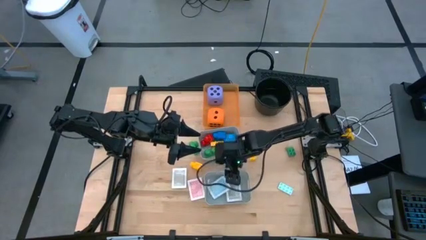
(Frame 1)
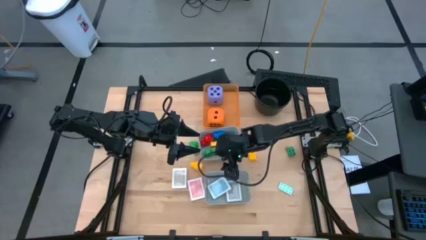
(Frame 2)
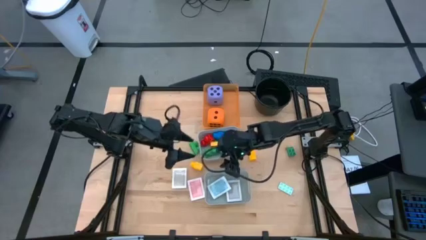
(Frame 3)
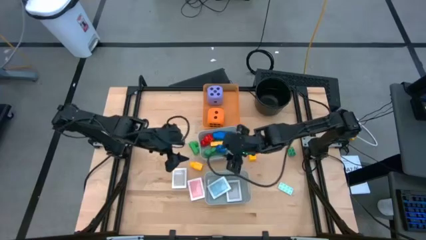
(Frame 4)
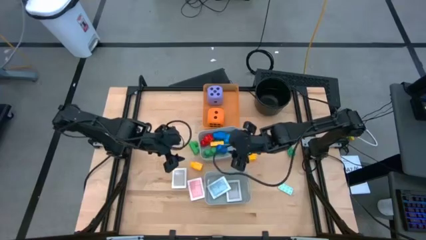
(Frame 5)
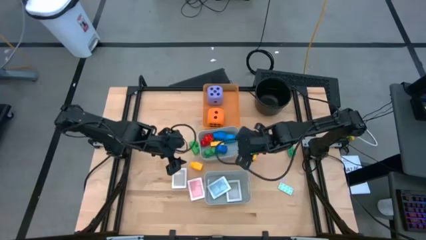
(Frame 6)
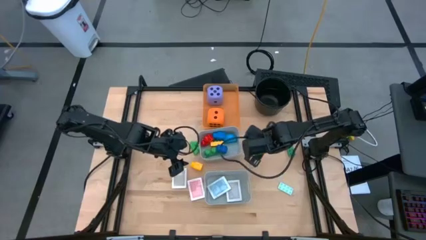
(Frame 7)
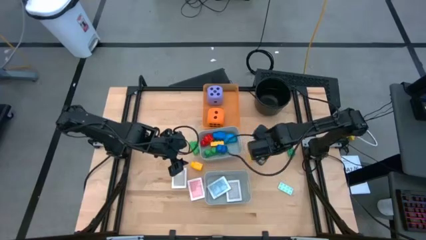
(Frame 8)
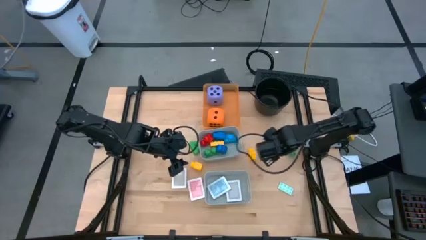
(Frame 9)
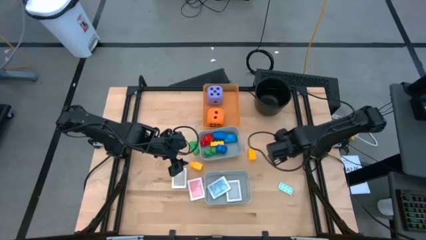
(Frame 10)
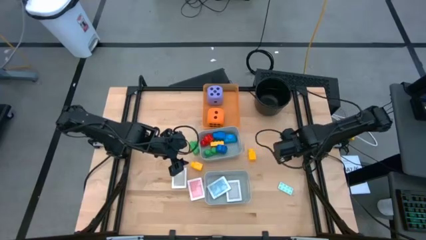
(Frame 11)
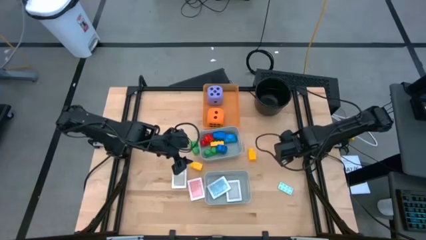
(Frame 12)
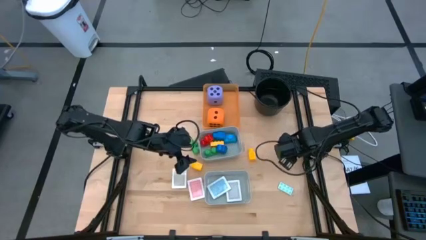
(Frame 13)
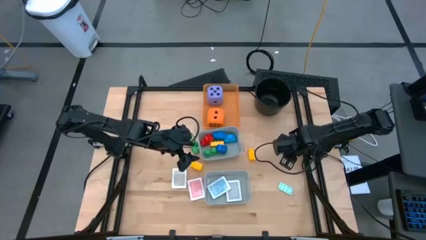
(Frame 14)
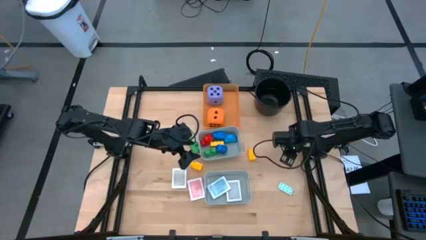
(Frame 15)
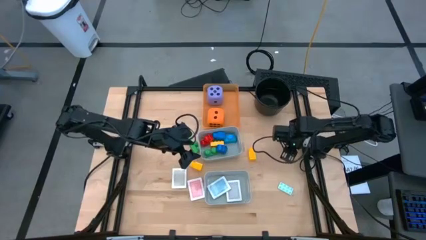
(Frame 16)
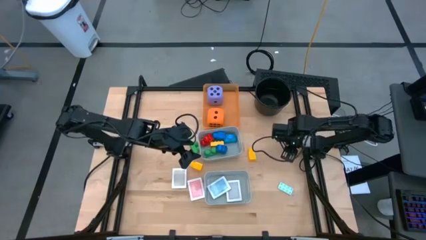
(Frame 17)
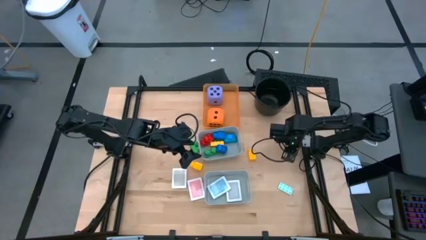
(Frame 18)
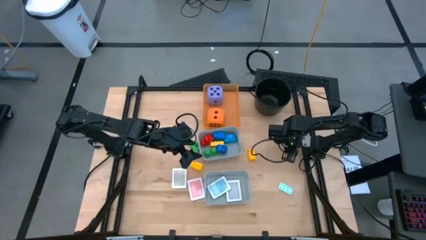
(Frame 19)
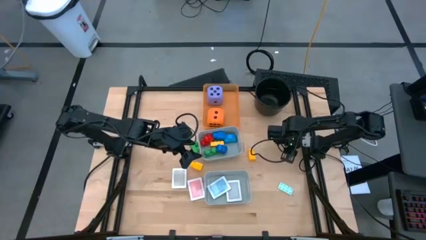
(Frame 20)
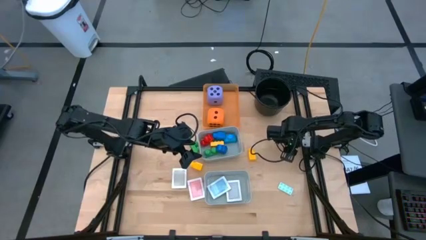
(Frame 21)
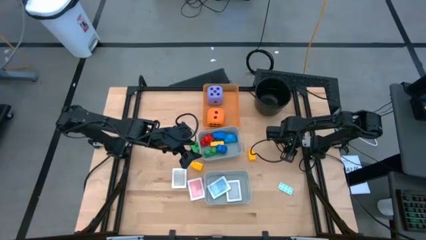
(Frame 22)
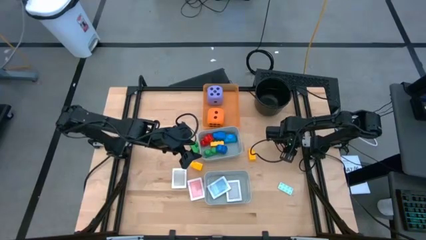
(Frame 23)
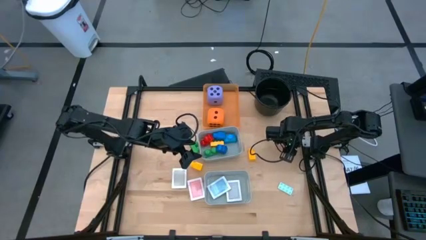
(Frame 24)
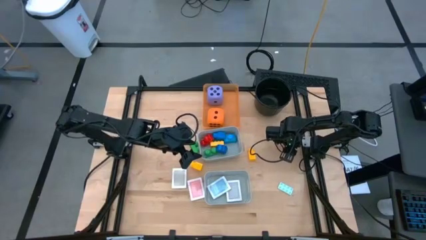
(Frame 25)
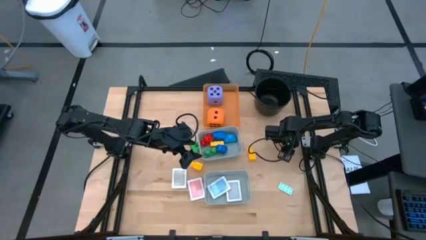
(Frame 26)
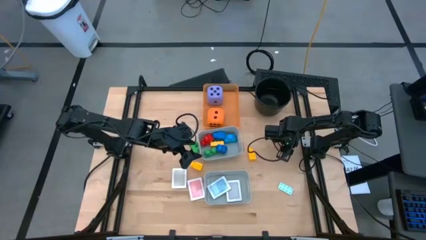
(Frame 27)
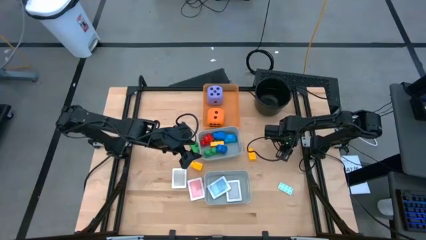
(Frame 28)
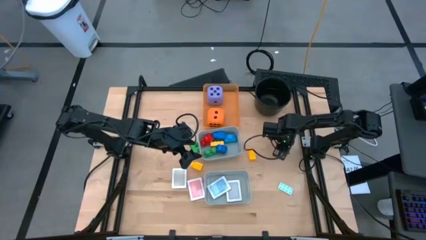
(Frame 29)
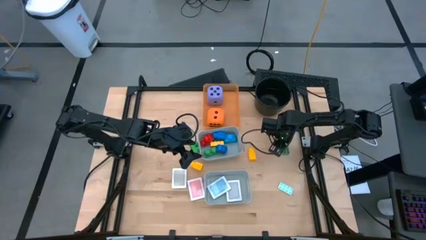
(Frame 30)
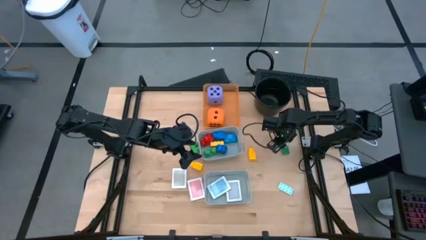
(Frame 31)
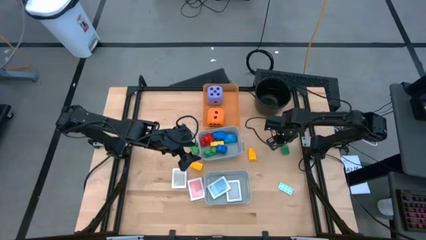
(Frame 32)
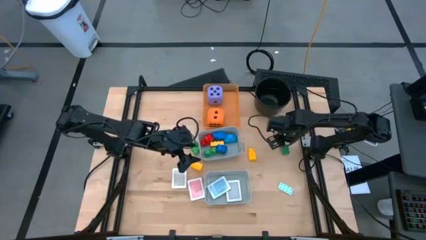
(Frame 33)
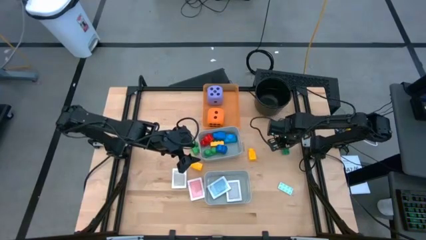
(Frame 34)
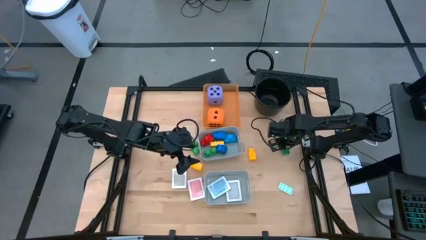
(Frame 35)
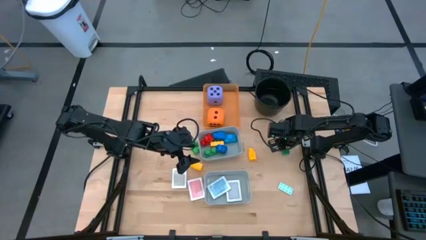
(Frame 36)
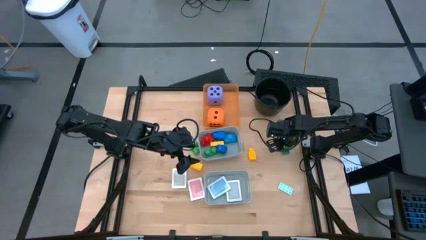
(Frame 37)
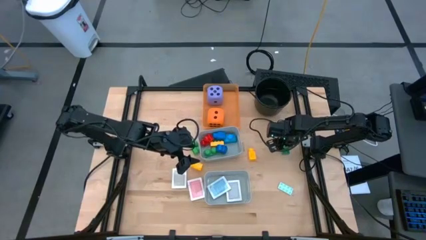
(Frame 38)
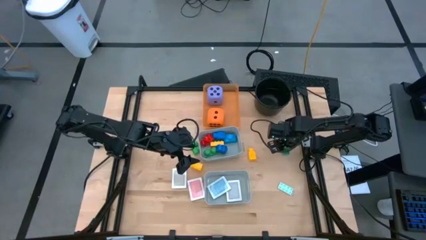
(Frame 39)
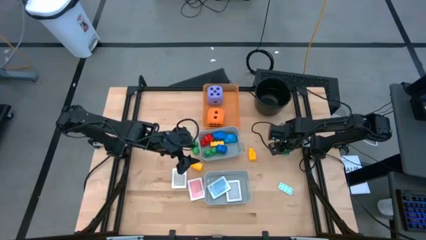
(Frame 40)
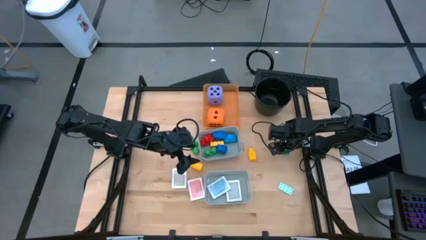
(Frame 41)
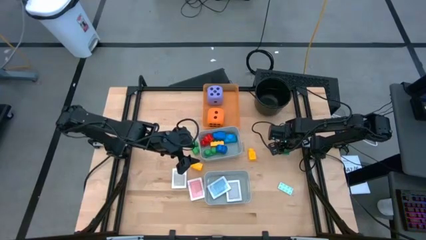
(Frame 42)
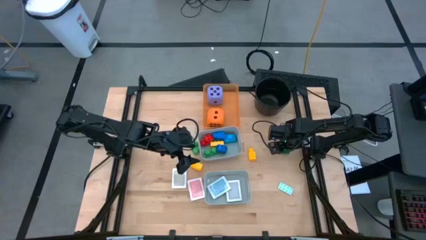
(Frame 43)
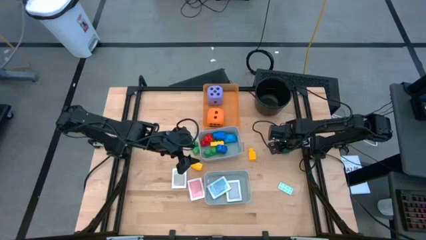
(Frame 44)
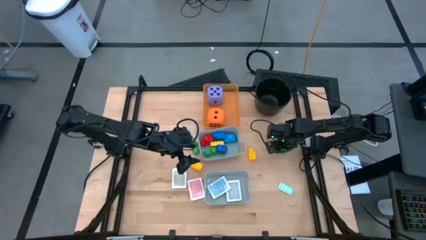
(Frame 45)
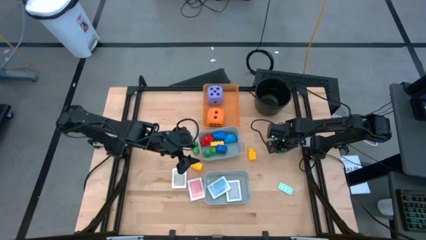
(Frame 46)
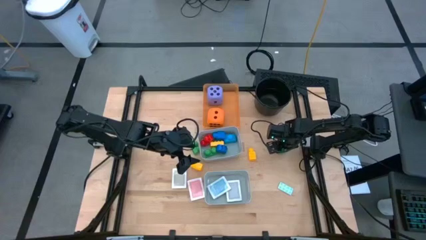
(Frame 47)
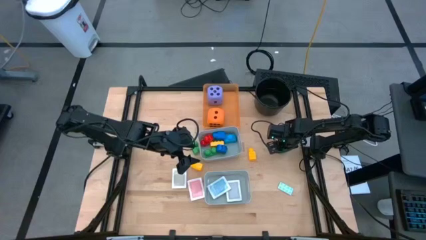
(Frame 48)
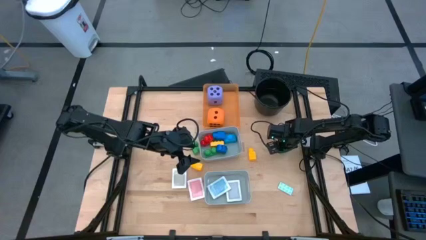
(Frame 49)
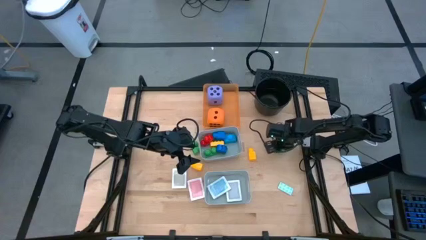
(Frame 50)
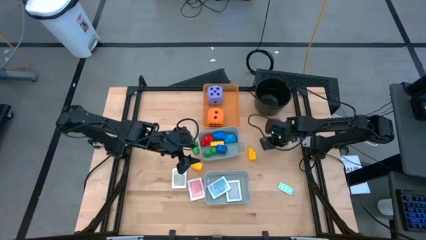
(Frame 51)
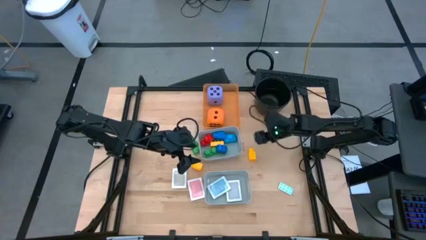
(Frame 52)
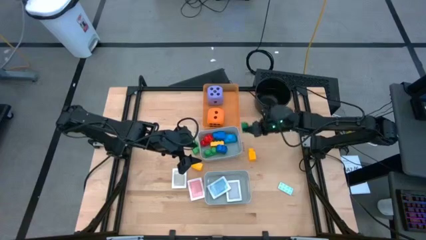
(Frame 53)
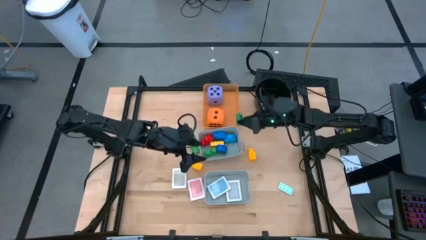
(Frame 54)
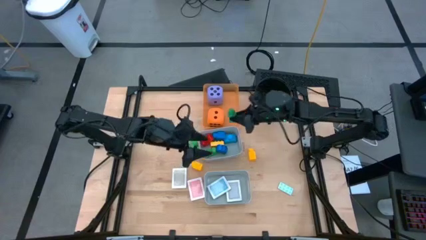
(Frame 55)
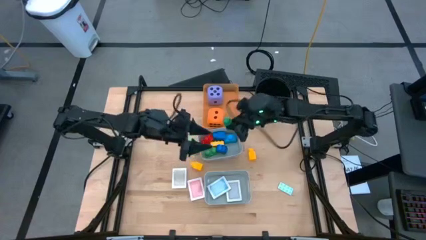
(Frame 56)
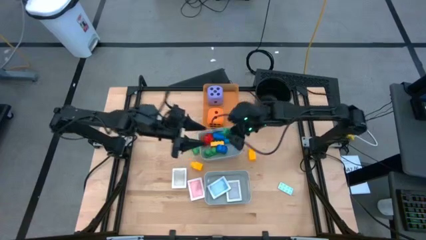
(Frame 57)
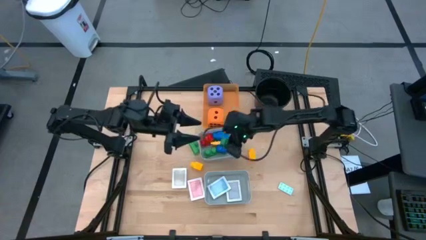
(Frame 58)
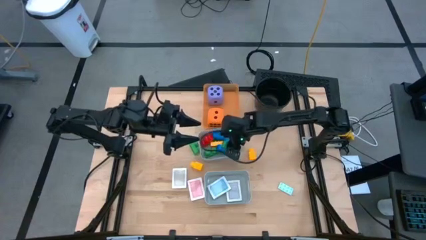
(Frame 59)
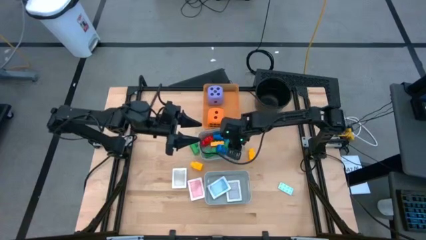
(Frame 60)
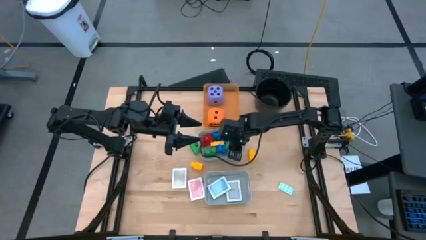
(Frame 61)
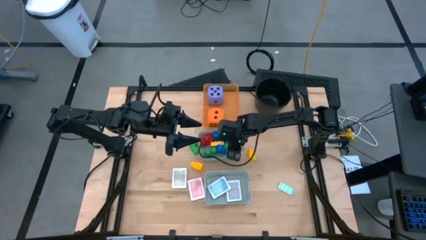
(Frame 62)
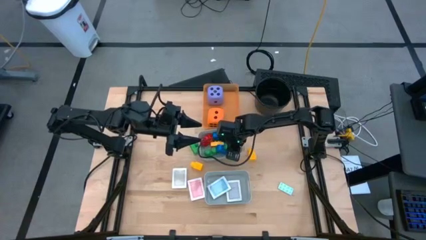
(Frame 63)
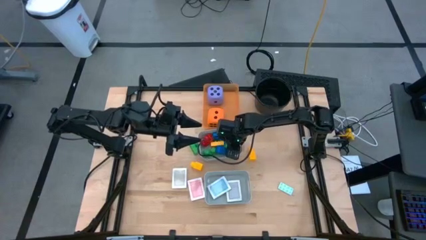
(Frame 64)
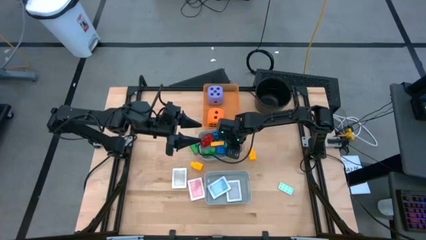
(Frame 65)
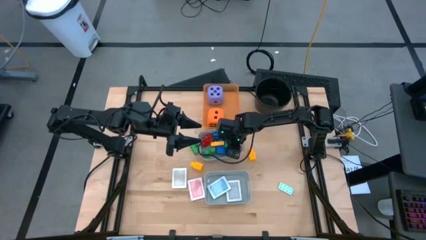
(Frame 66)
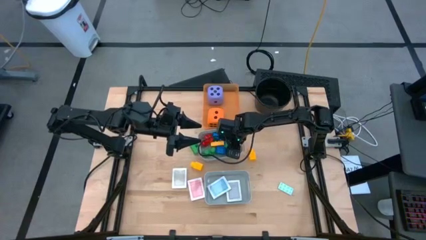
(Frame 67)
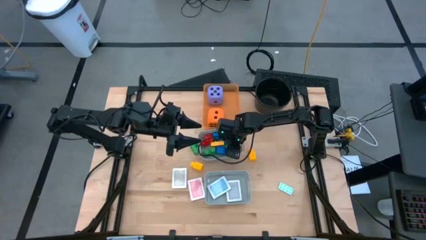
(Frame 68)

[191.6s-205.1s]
Task: Pick & Place Toys
Put the green game piece into the top gray bin
